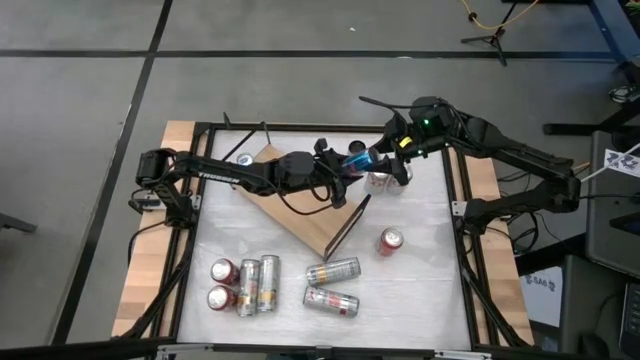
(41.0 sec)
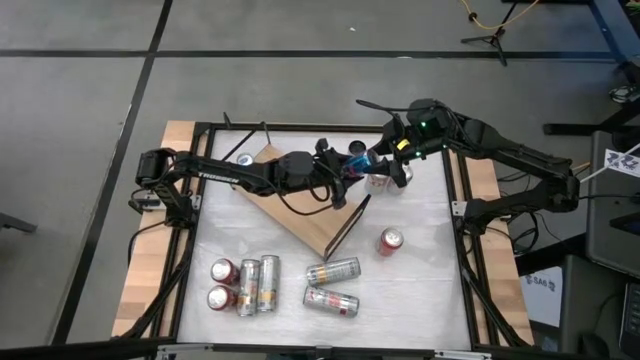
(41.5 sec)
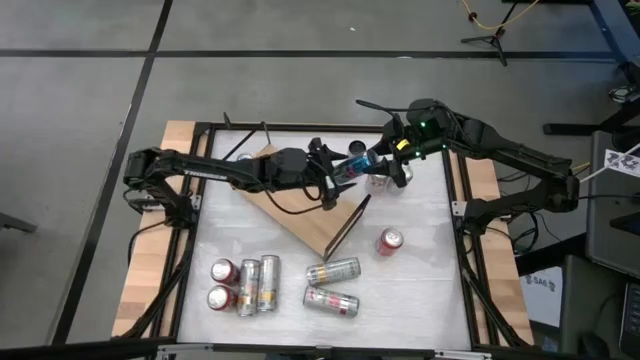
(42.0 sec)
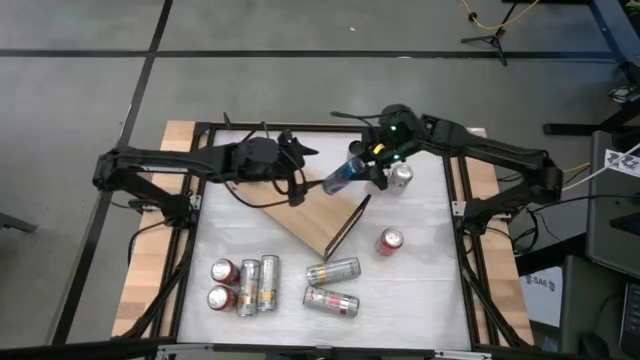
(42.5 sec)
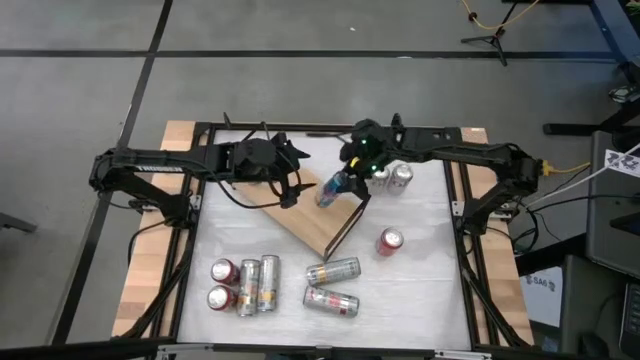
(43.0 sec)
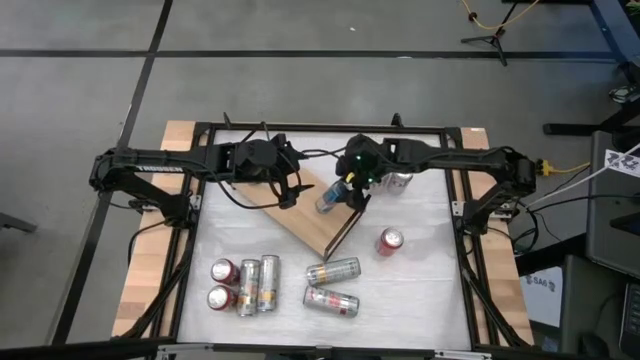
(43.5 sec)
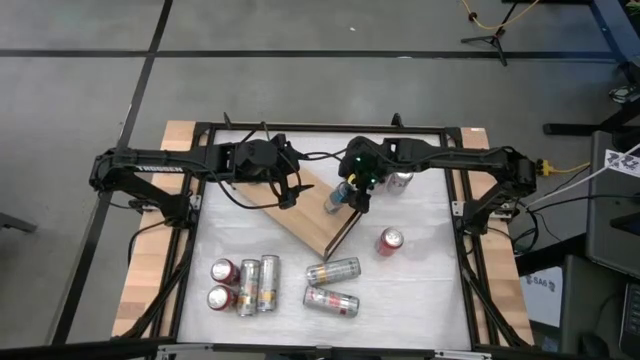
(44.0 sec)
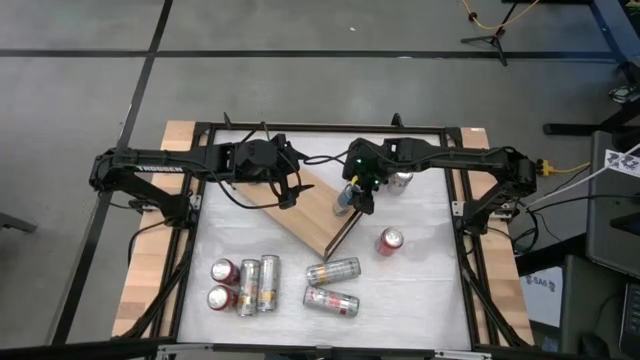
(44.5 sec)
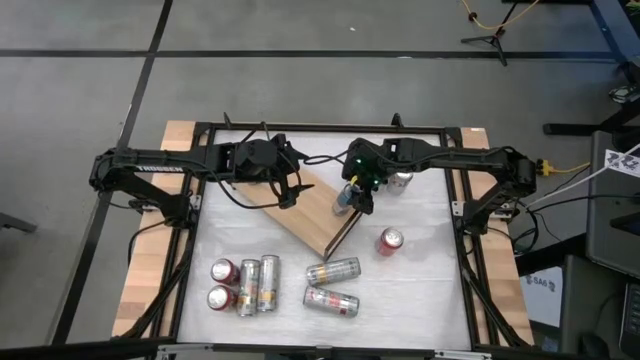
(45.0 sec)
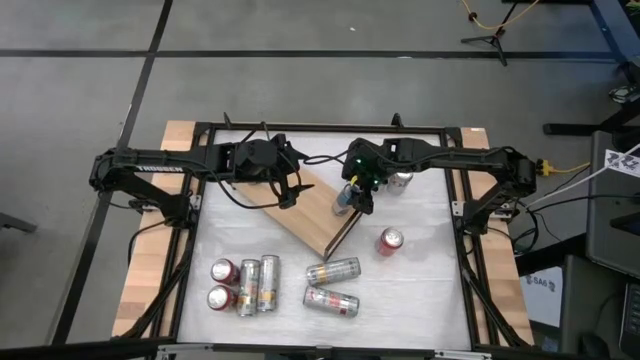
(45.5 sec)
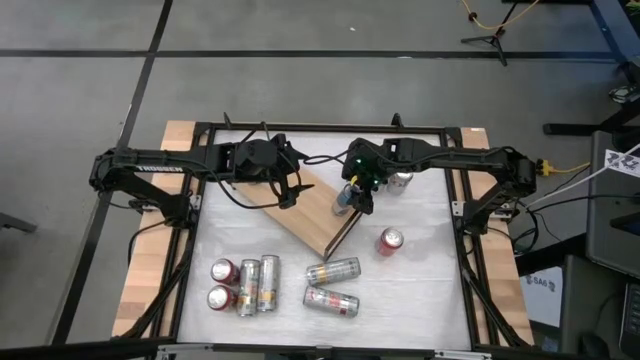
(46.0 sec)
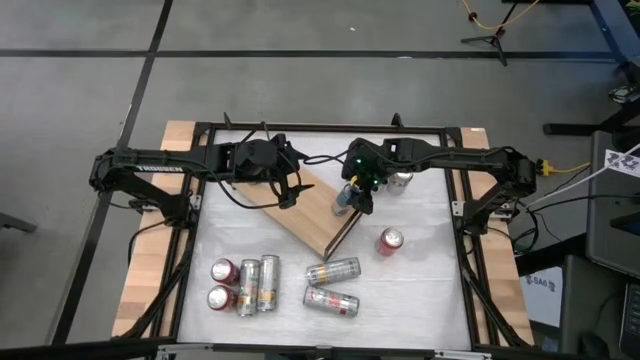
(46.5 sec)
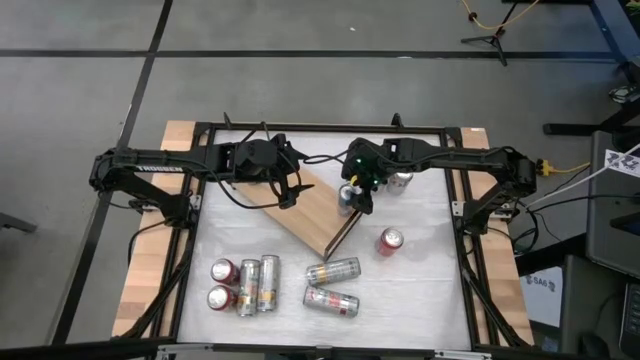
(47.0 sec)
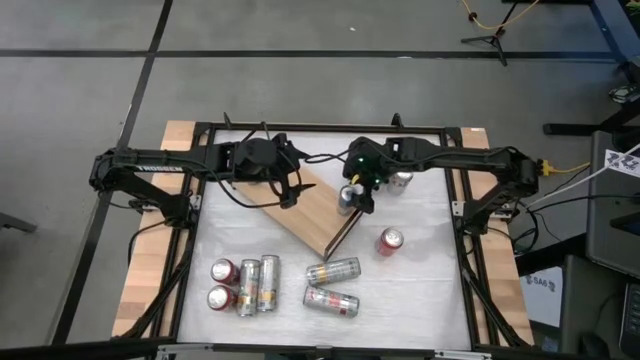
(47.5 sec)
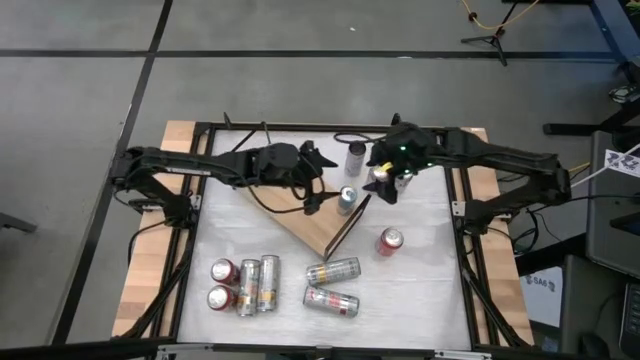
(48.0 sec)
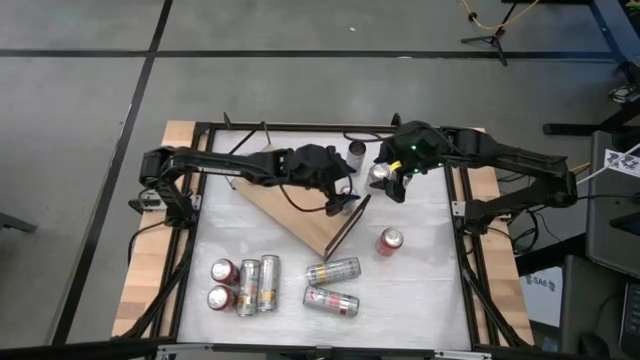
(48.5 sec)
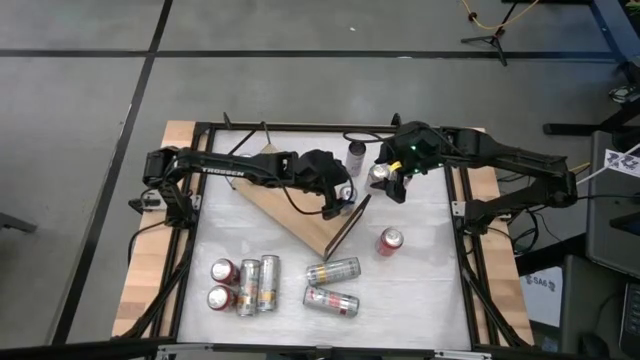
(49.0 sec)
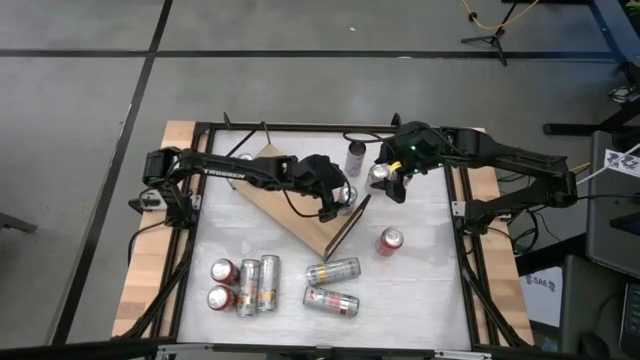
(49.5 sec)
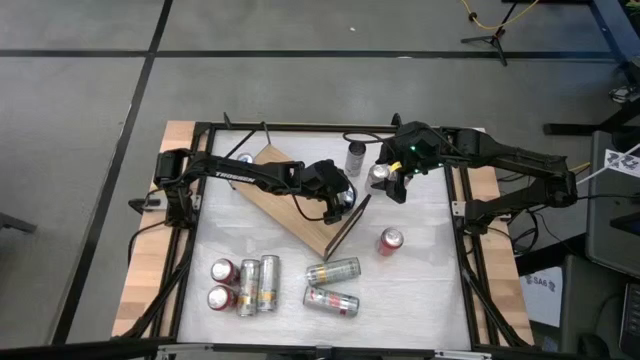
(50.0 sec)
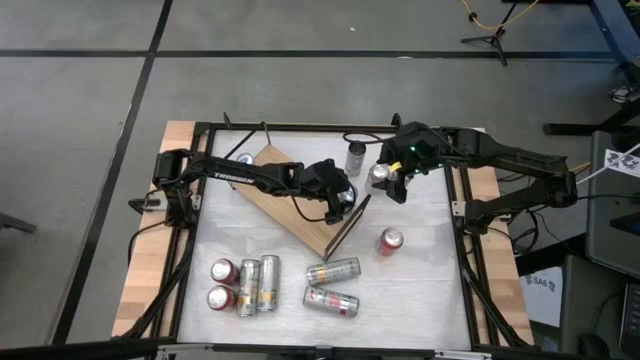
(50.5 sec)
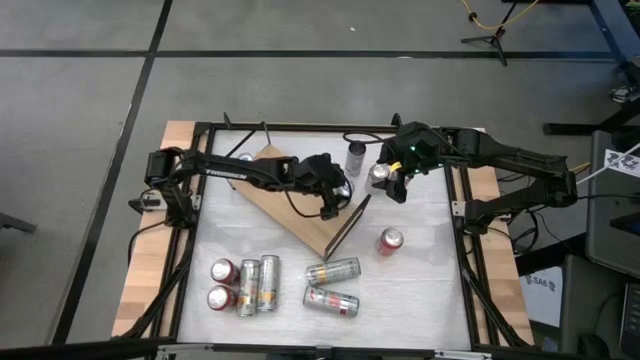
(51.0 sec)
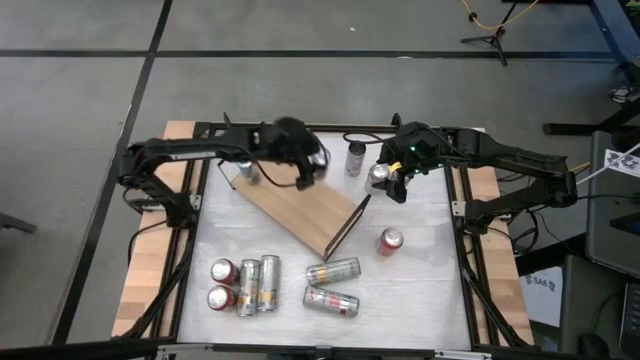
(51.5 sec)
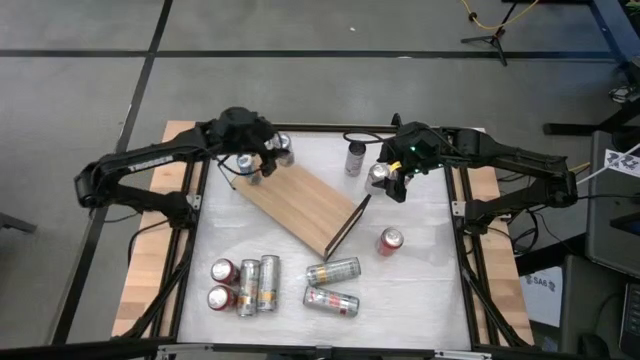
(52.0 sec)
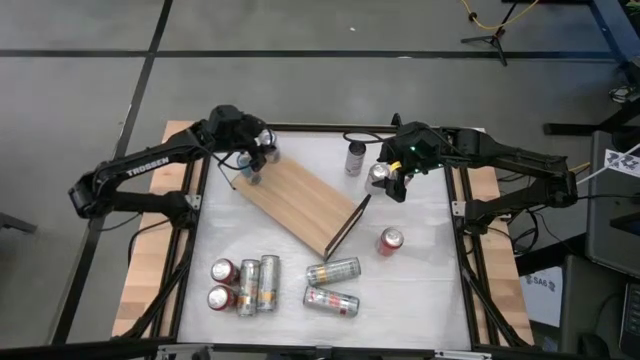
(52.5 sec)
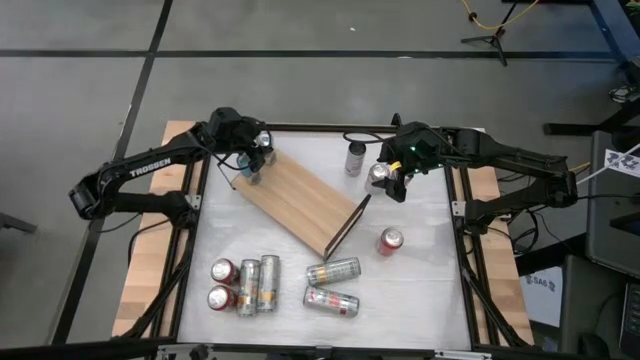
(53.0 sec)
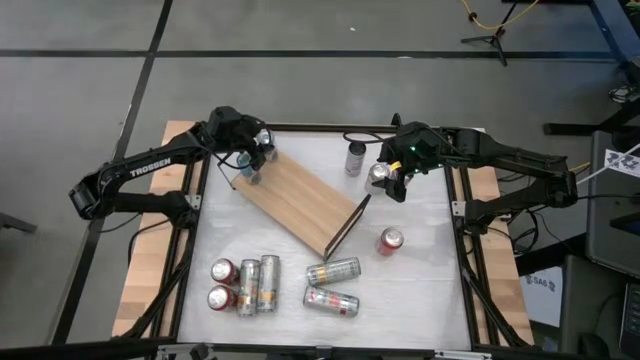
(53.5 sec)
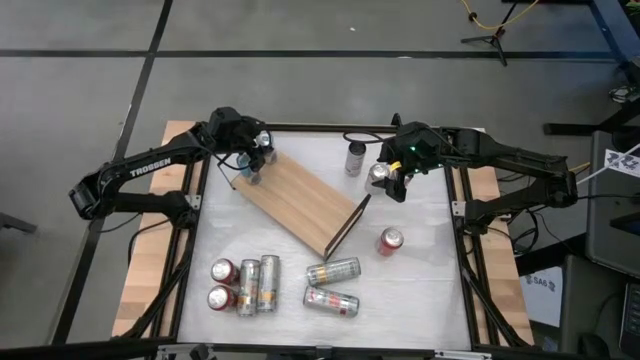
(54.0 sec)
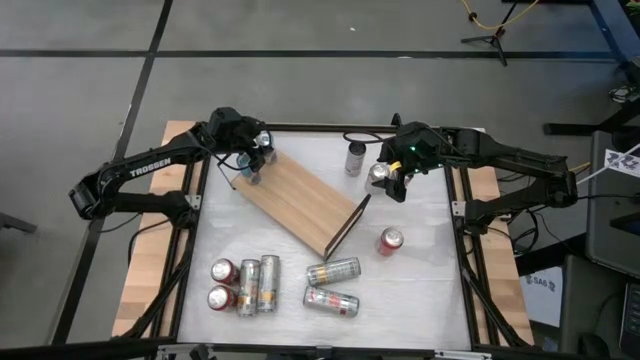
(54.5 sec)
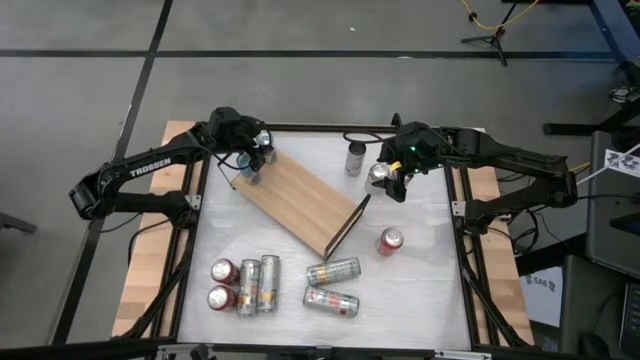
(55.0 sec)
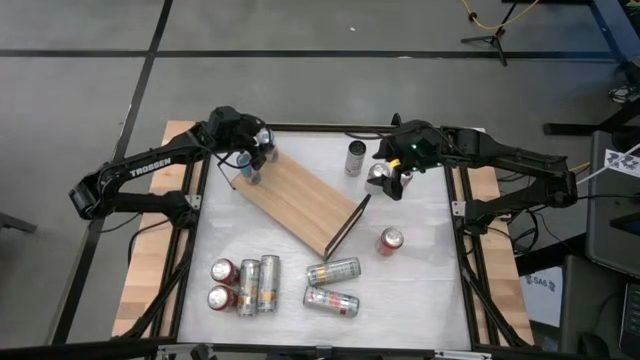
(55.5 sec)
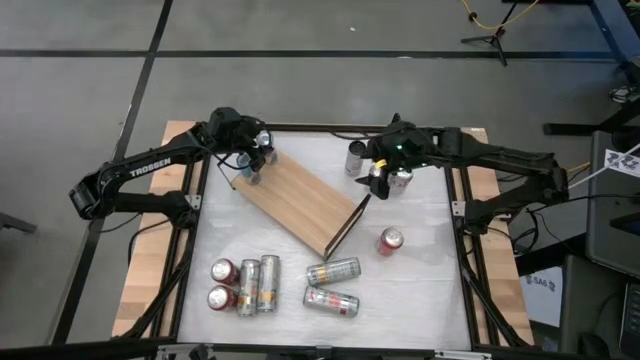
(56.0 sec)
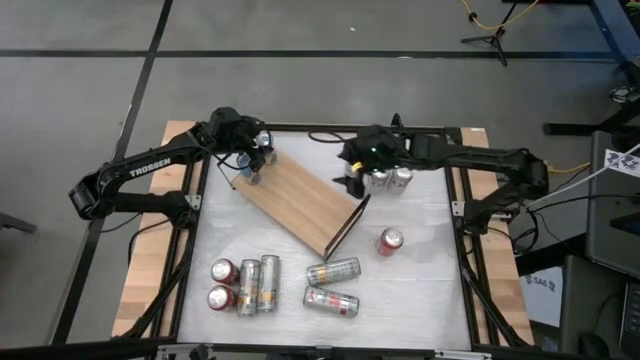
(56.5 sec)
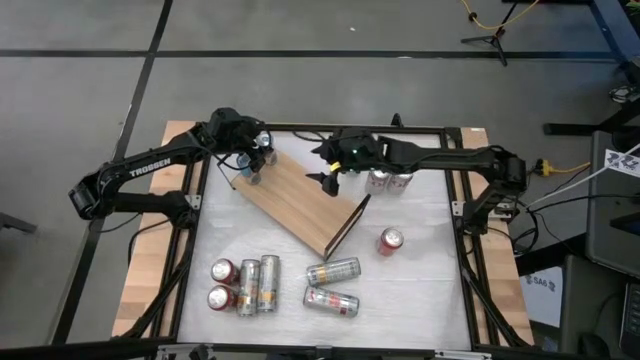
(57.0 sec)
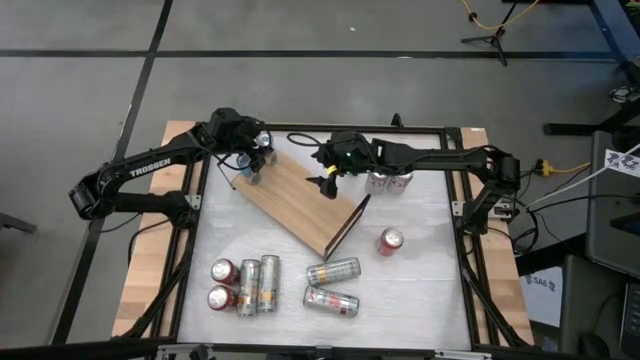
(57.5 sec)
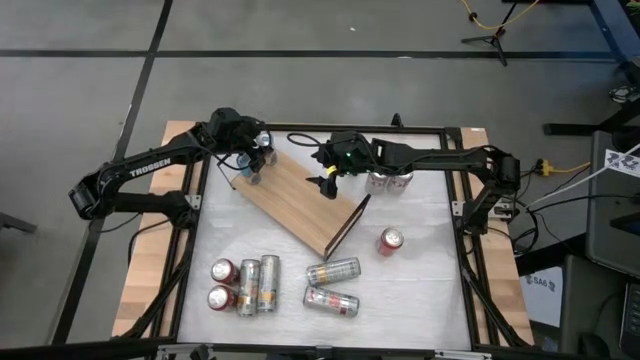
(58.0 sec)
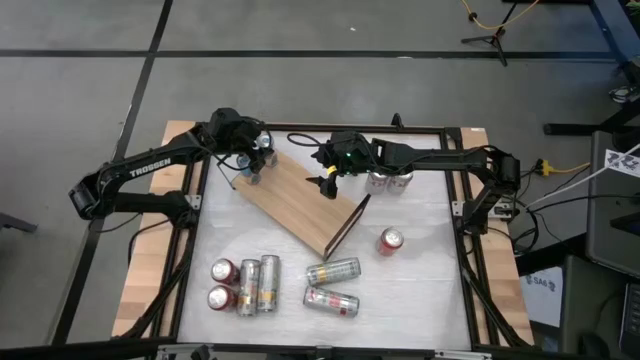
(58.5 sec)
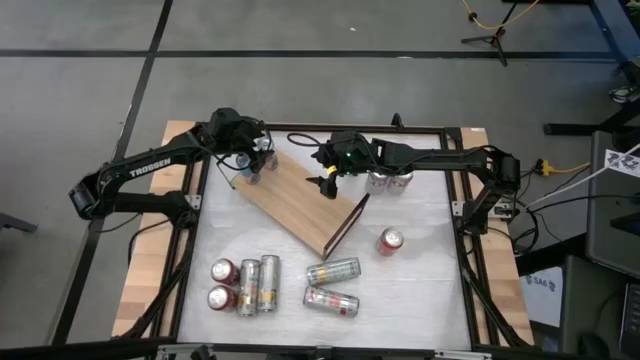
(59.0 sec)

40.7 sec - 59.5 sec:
Task: Place canned beverage on shelf
Put the blue soda can aligned with the blue soda can on the shelf

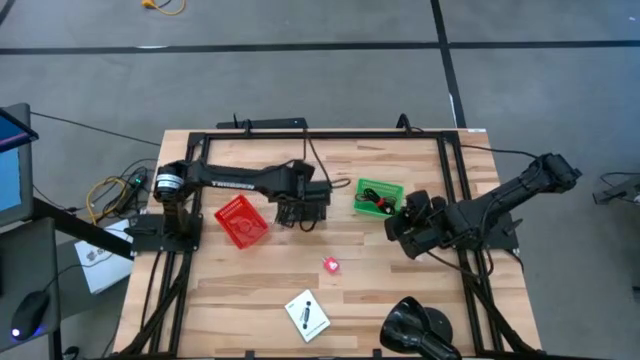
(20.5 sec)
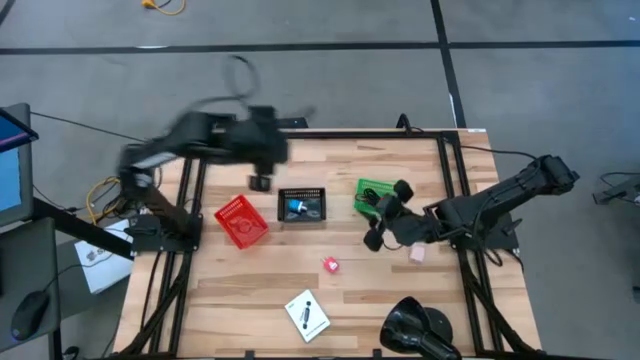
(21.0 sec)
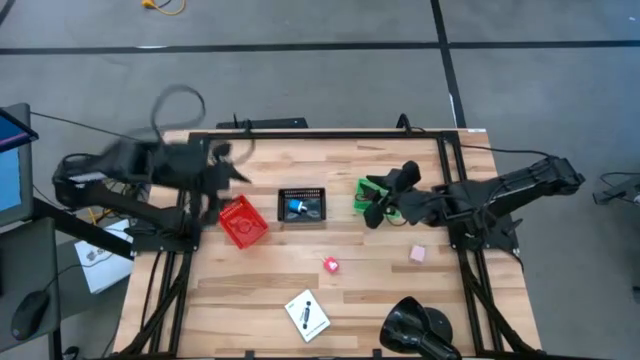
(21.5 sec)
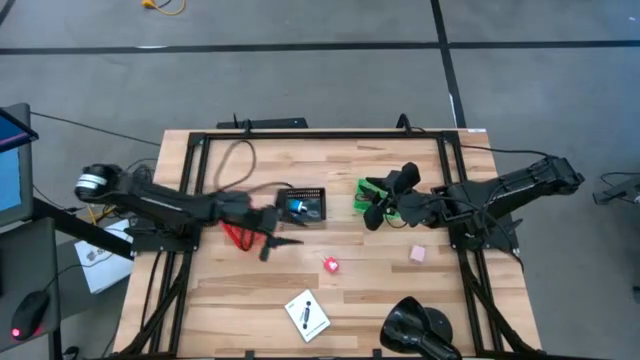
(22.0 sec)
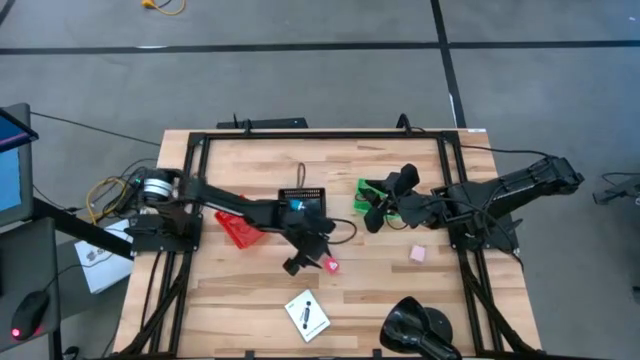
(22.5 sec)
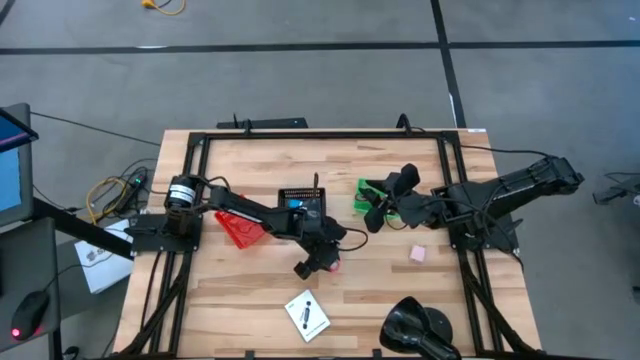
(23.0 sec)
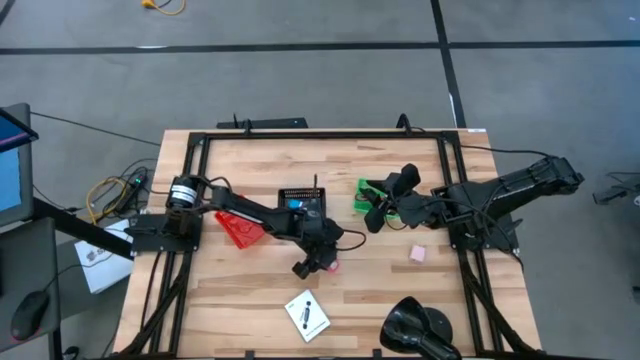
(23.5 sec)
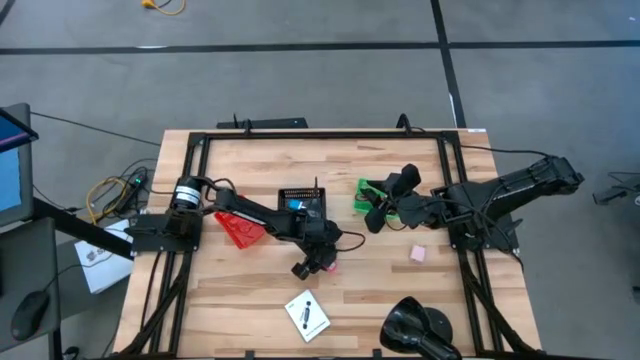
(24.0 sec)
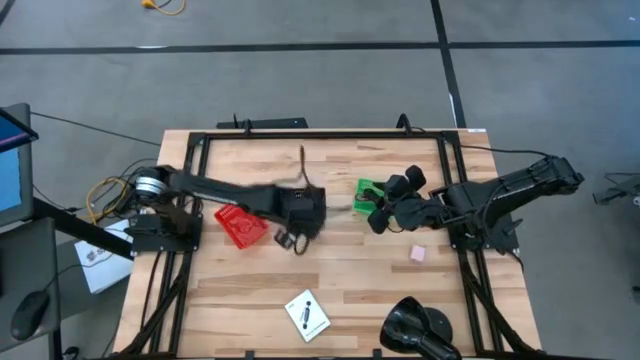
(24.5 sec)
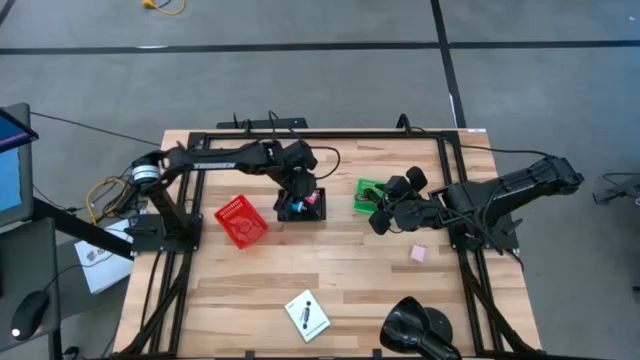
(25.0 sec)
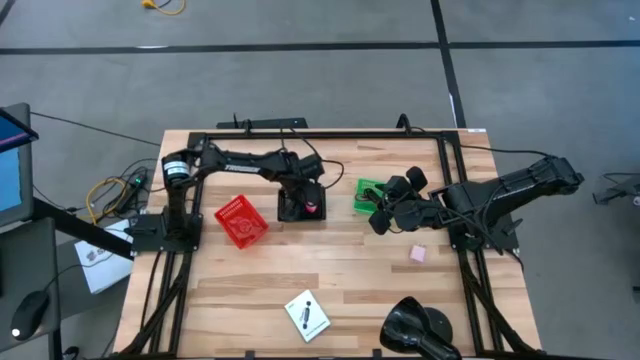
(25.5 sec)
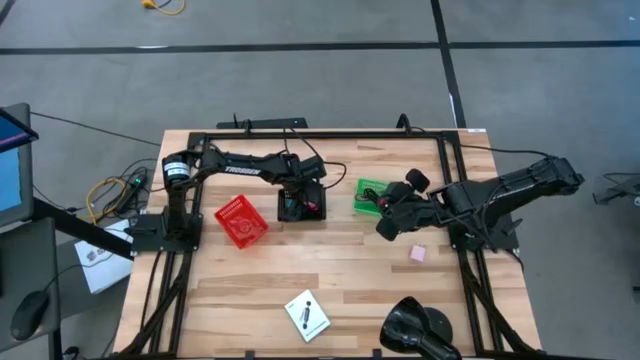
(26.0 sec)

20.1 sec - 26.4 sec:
Task: Pick and place items into bin
Put the pink charger adapter into the black bin
